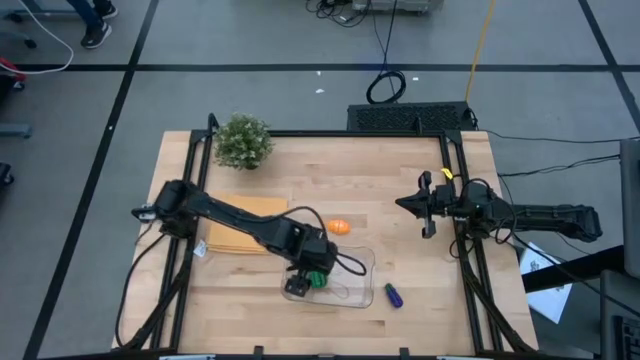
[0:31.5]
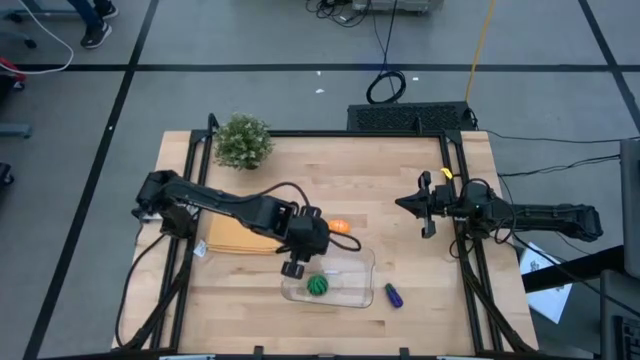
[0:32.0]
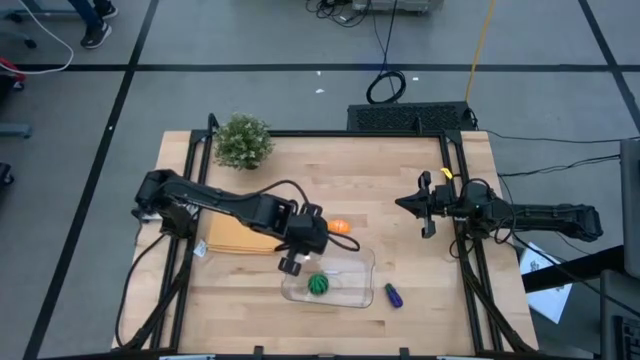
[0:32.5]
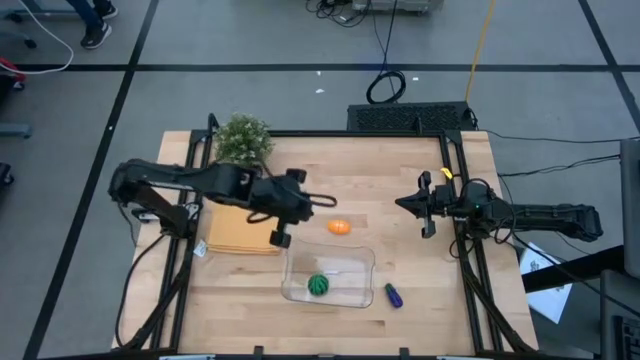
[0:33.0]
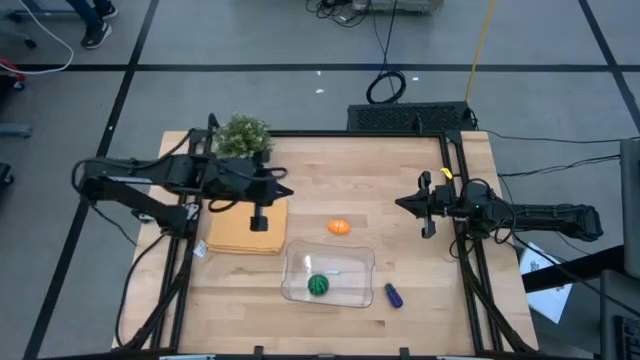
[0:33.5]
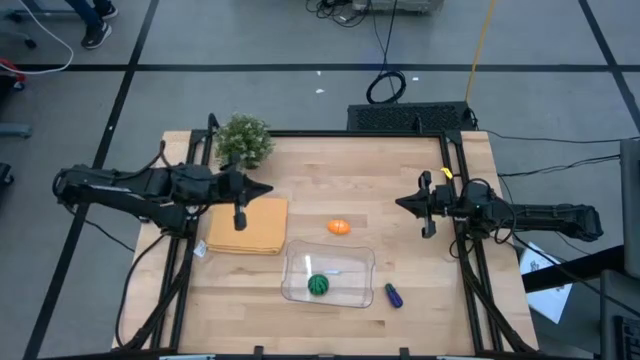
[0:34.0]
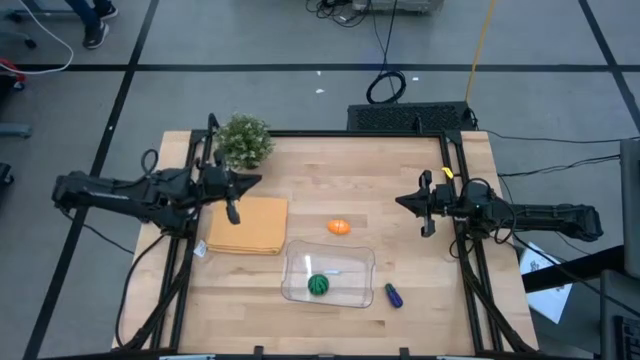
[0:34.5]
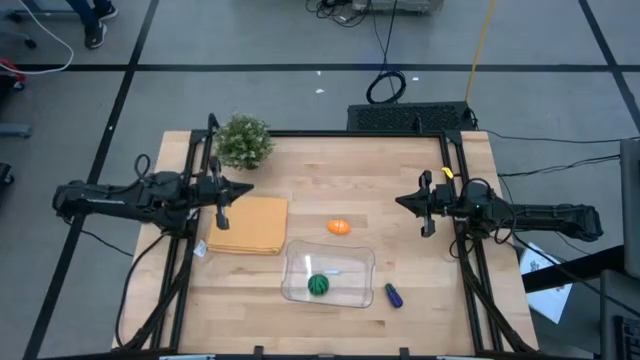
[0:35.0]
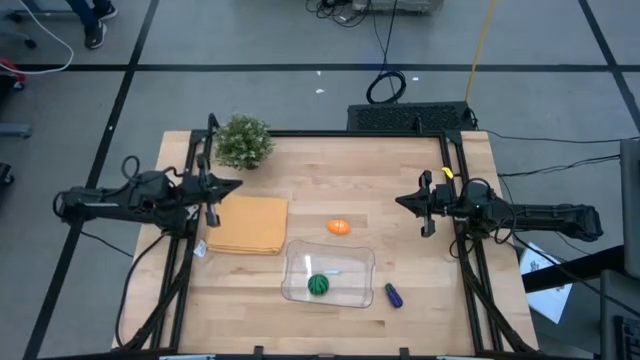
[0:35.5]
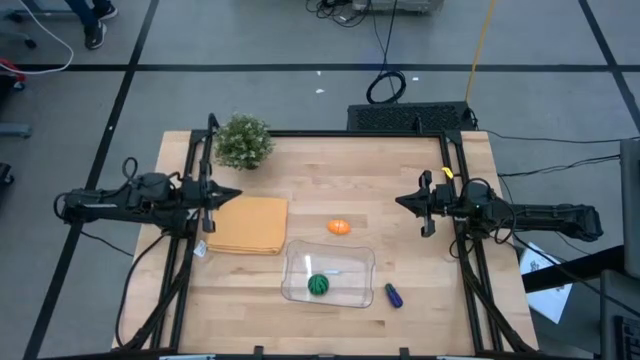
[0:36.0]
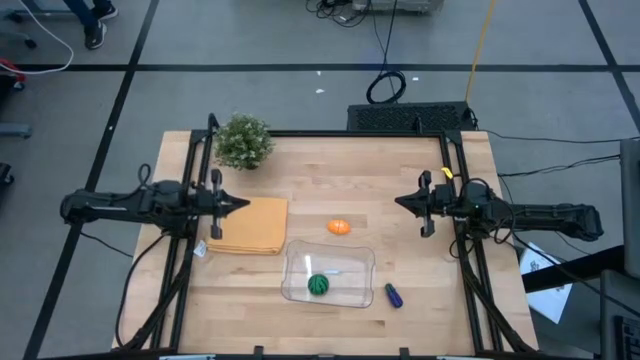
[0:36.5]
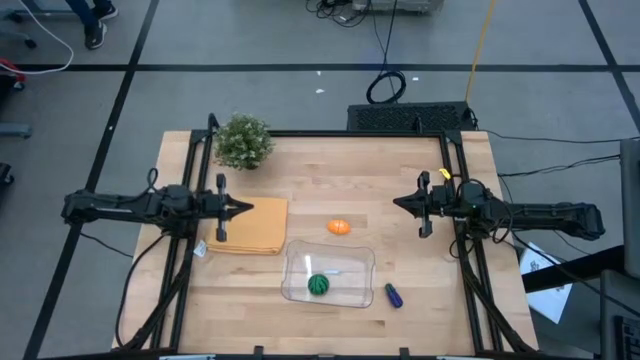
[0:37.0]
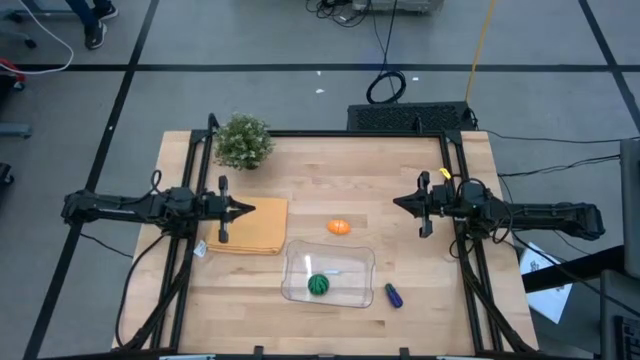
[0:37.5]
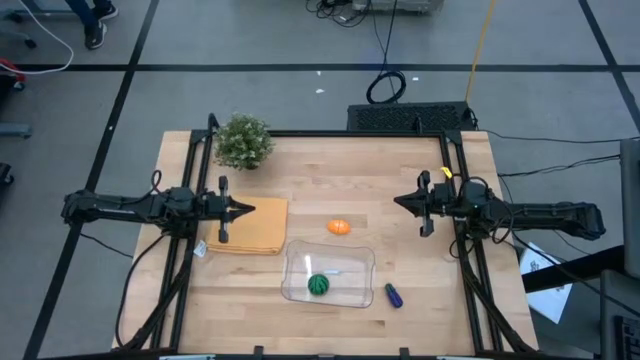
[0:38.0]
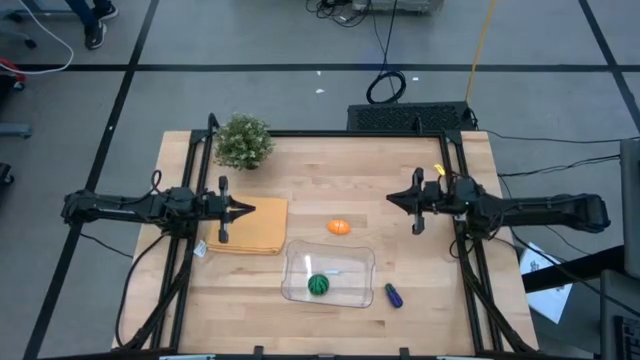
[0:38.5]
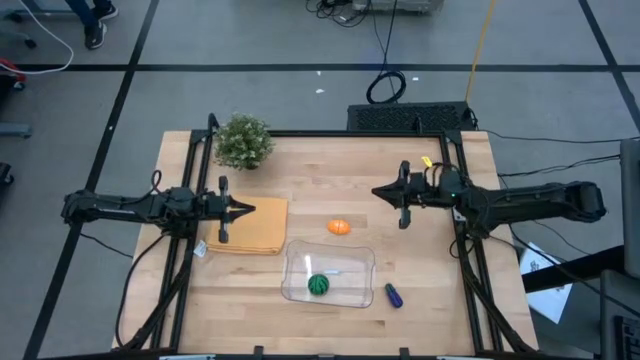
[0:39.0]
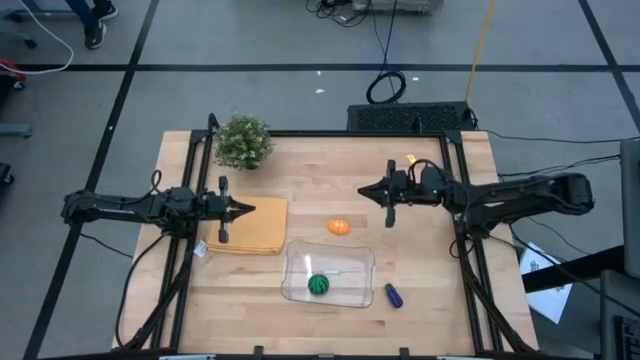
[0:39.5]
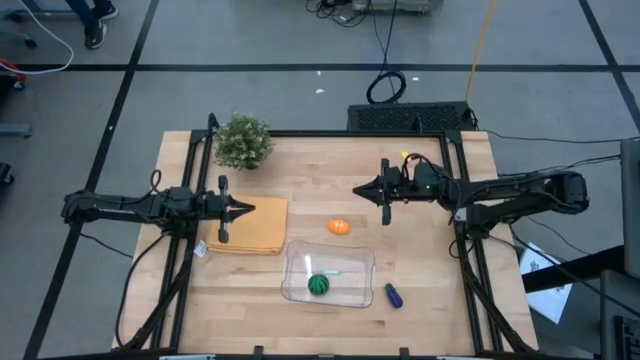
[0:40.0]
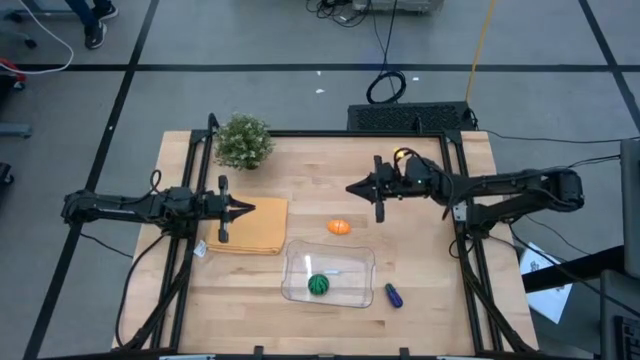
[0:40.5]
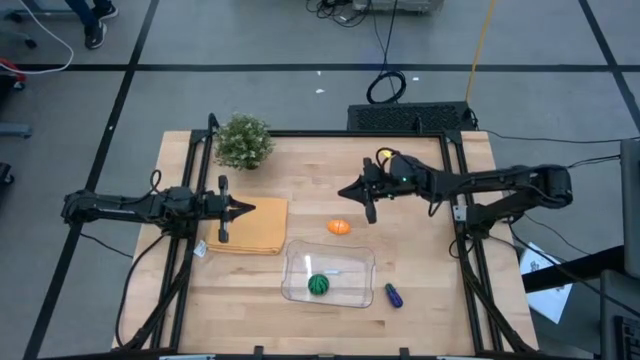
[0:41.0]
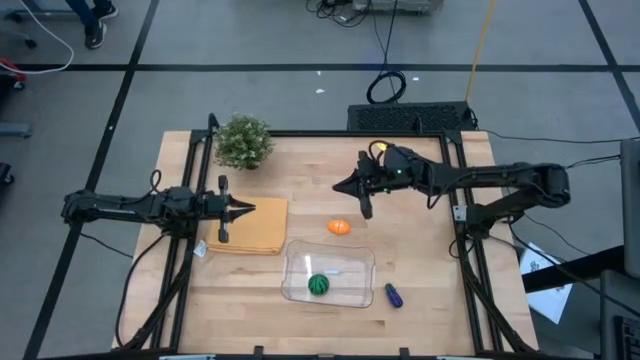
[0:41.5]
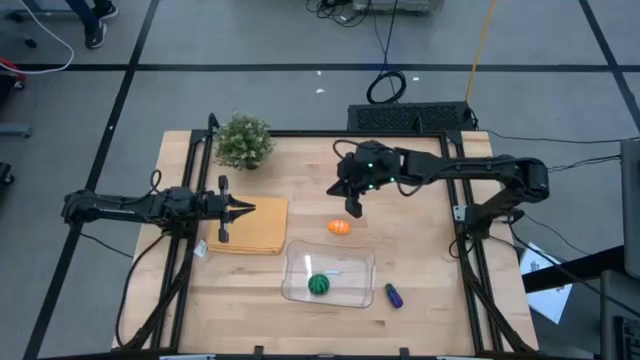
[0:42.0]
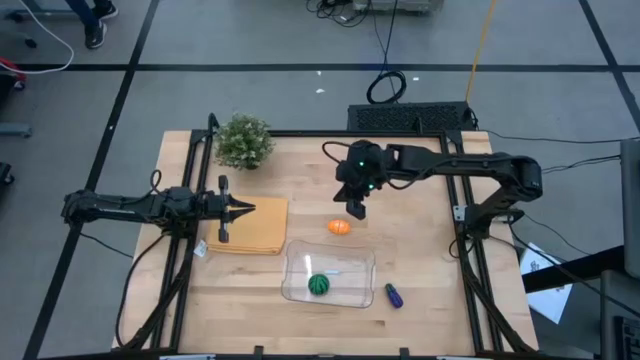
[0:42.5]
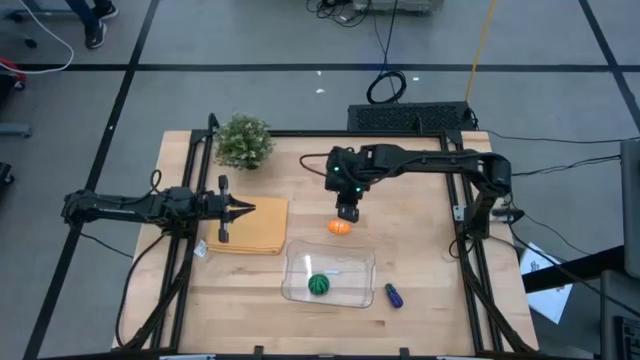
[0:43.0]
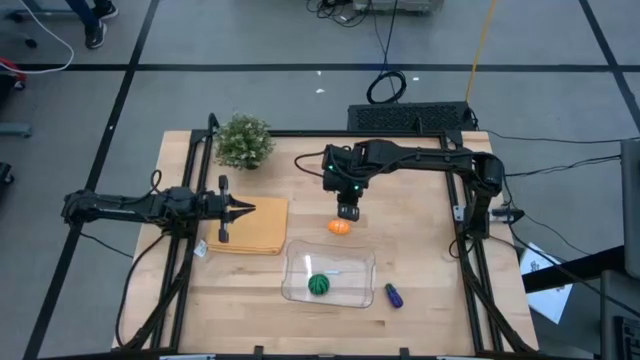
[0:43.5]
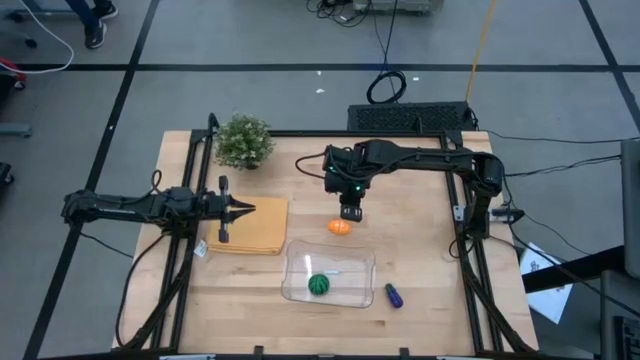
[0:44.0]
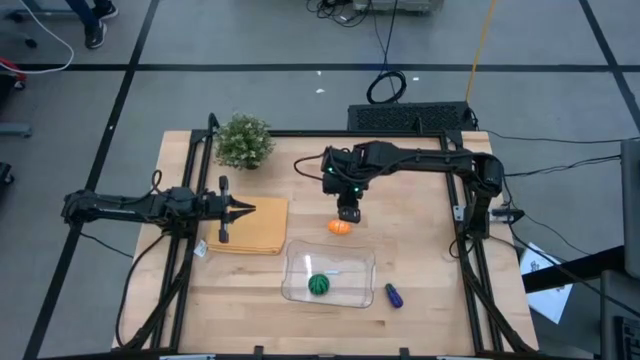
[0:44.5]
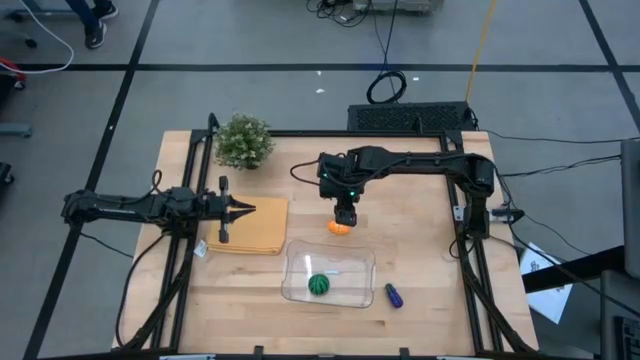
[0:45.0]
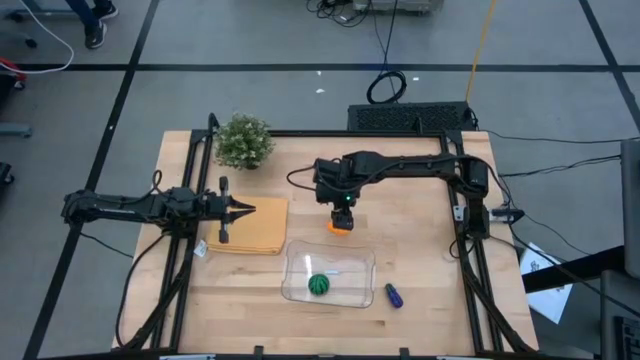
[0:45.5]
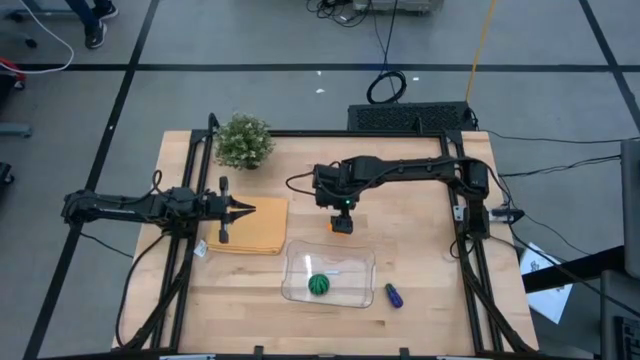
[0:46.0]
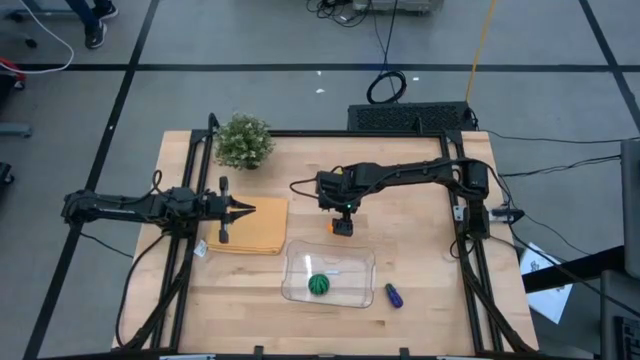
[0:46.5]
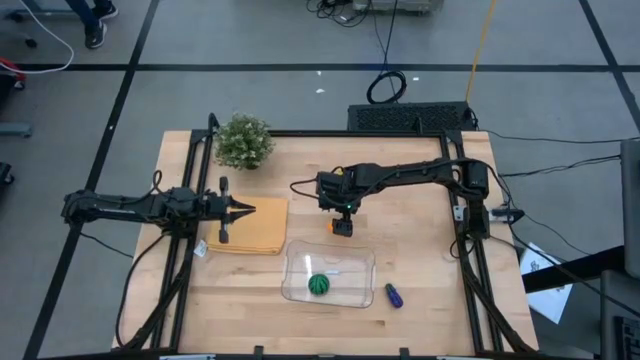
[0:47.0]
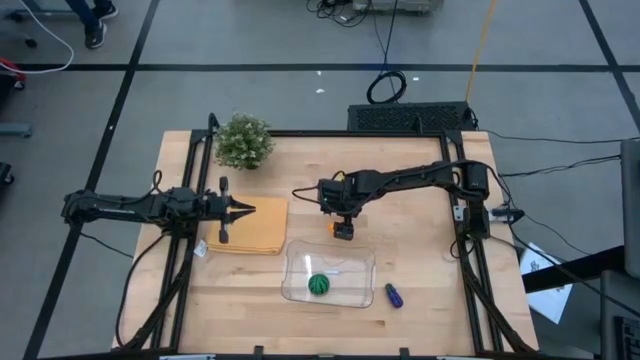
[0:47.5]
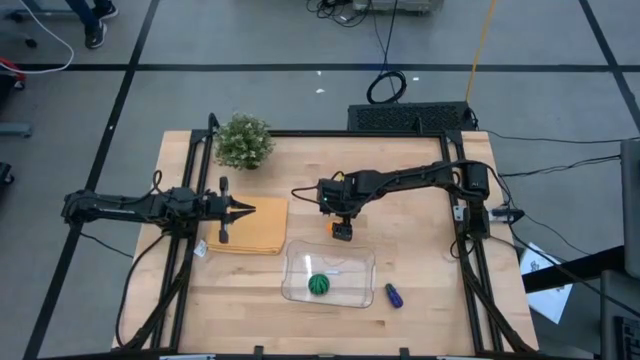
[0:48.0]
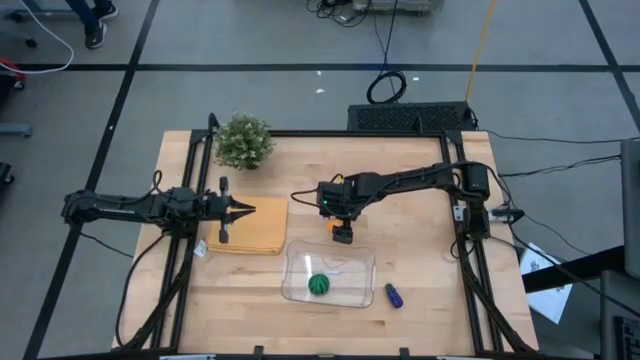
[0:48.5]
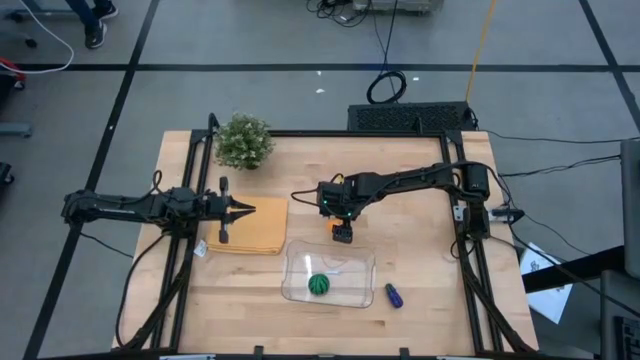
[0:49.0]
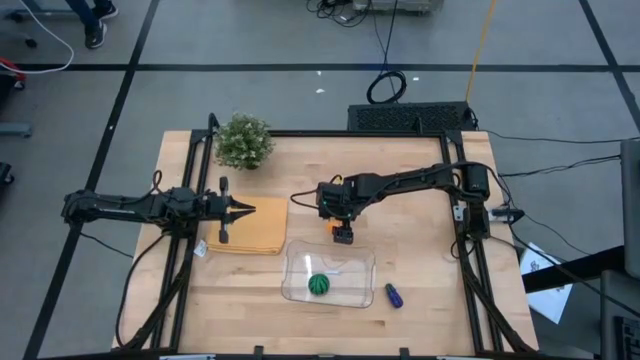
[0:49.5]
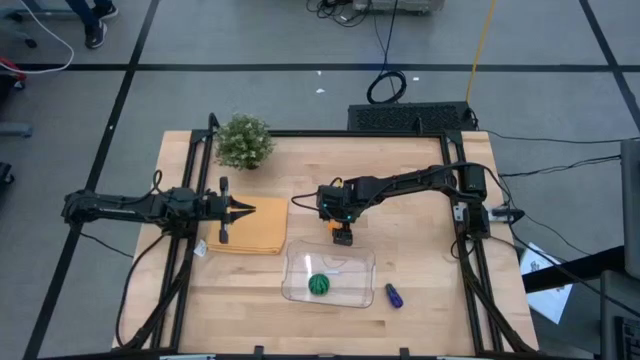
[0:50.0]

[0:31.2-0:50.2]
Task: Pick and placing Produce into tupperware
Put the light orange croissant into the transparent bin

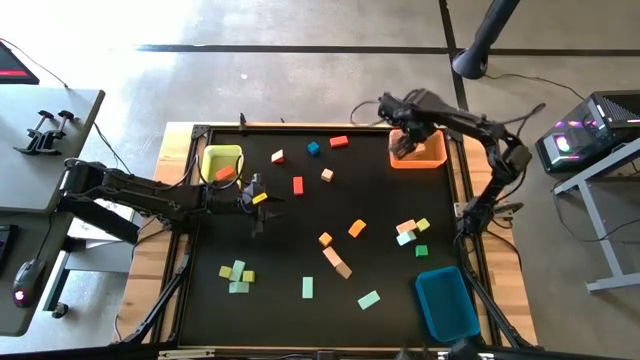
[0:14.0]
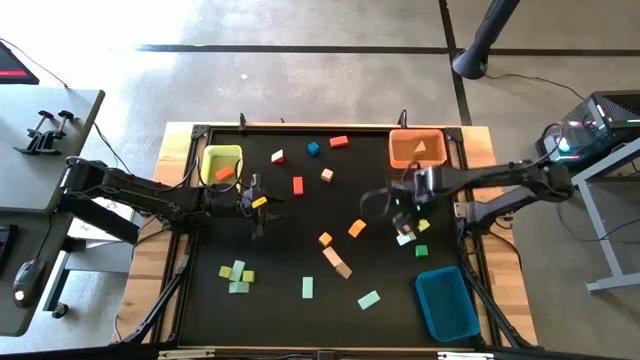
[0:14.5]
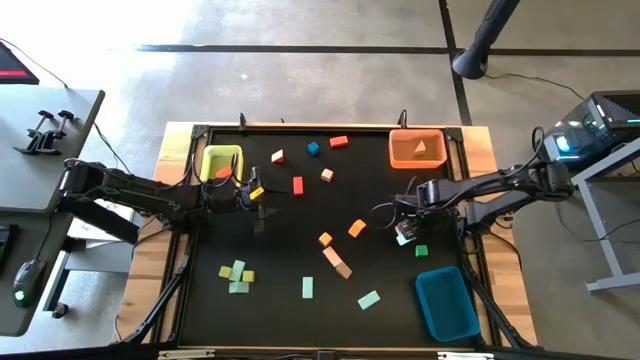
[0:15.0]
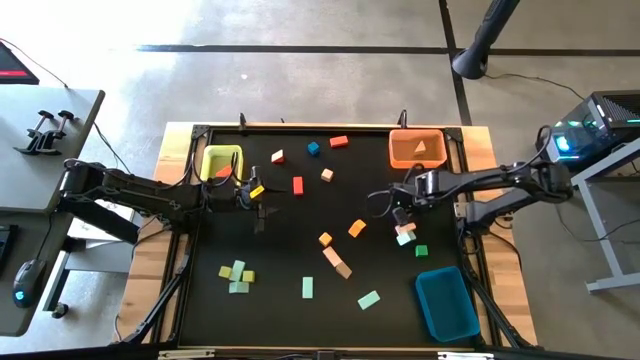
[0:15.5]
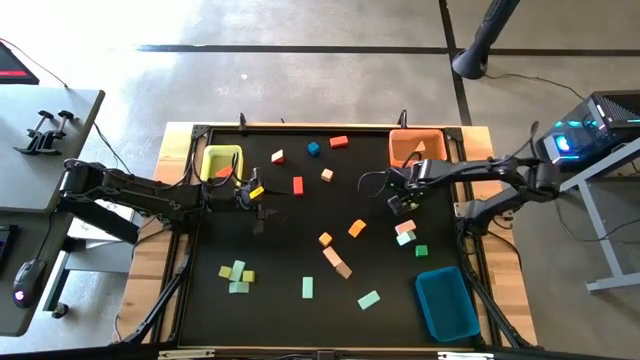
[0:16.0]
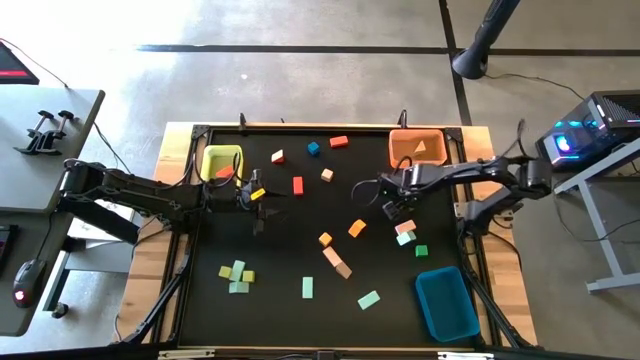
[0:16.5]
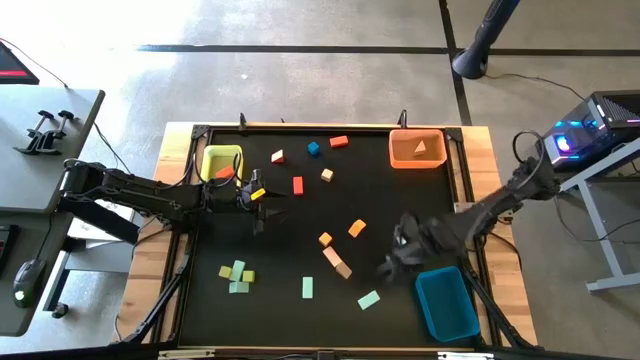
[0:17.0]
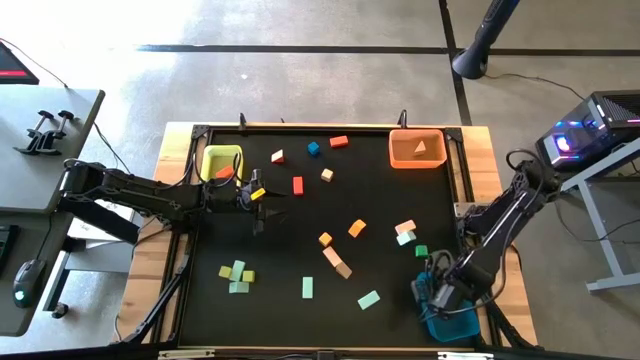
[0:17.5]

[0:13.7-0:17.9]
Task: Sort blocks by size
Put the light green square block into the blue bin
